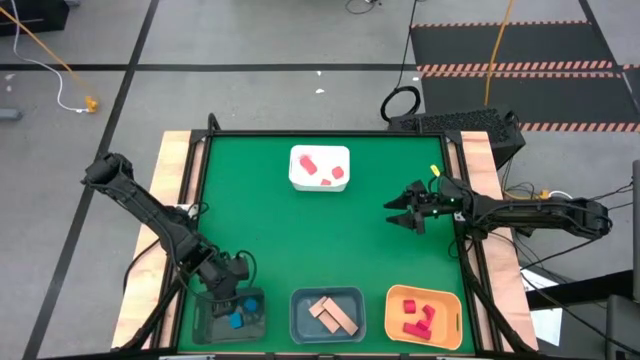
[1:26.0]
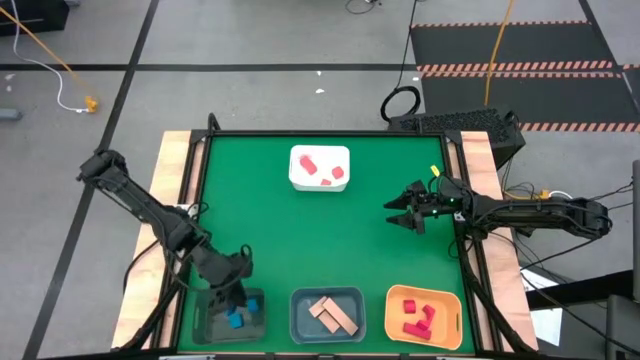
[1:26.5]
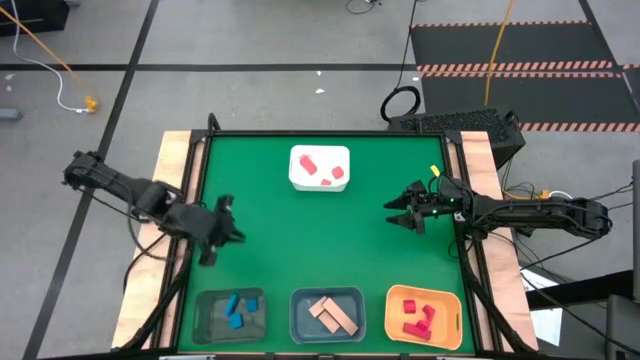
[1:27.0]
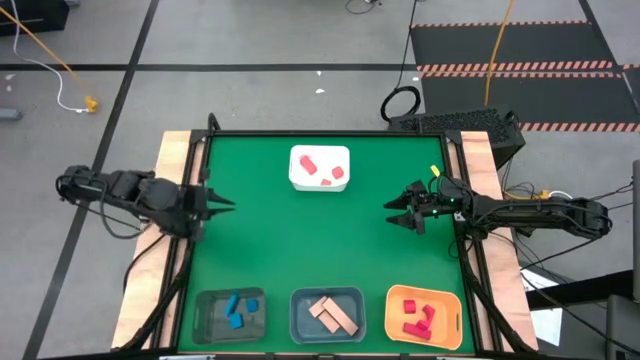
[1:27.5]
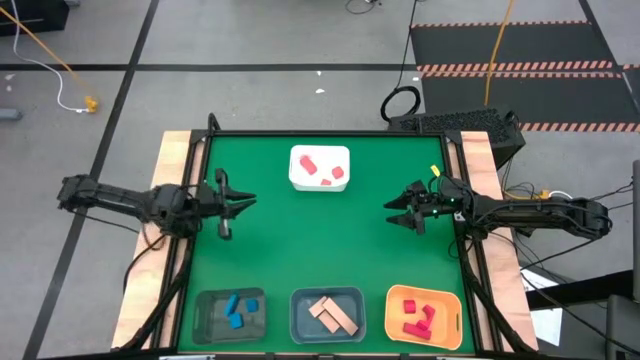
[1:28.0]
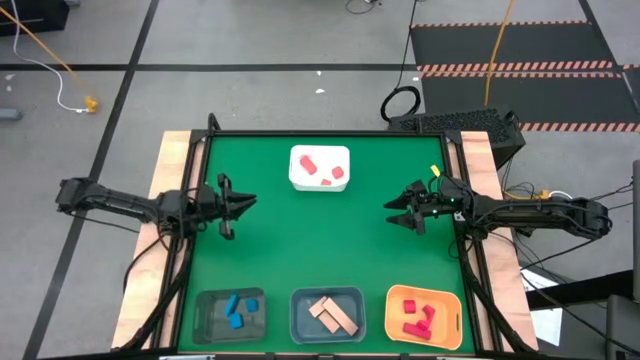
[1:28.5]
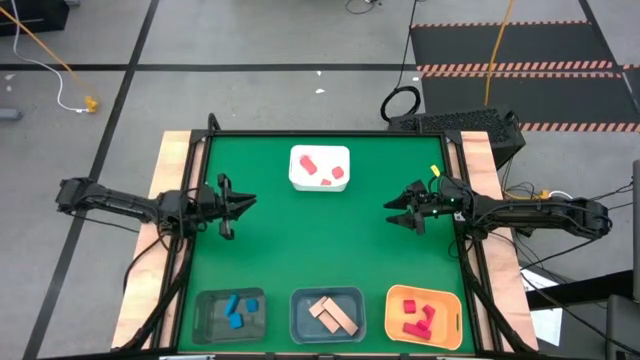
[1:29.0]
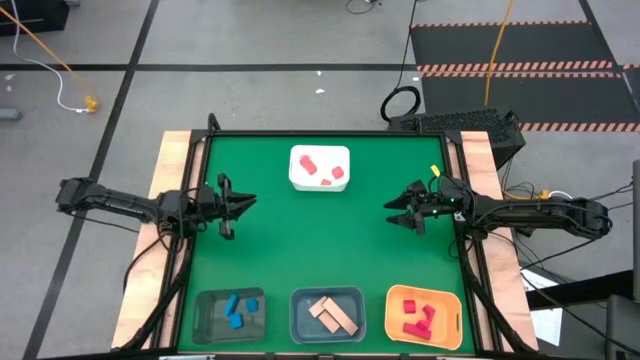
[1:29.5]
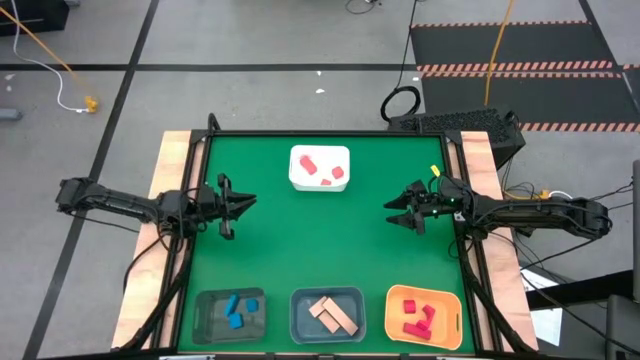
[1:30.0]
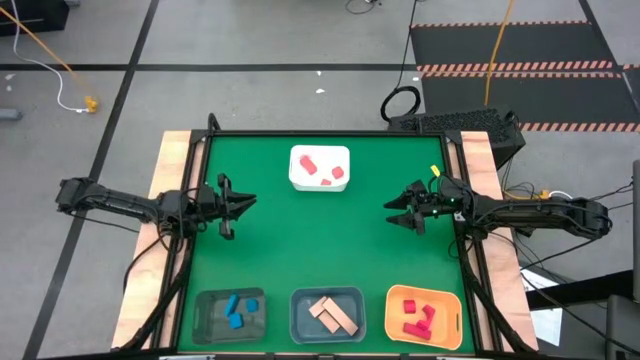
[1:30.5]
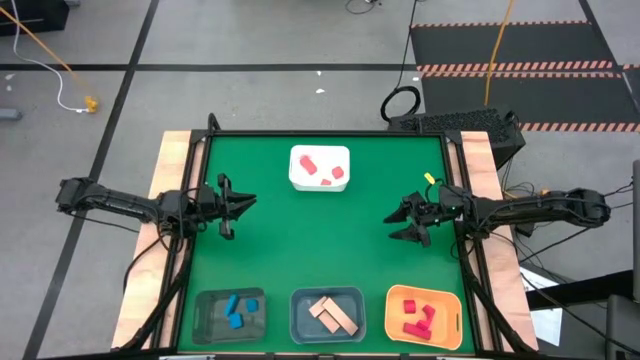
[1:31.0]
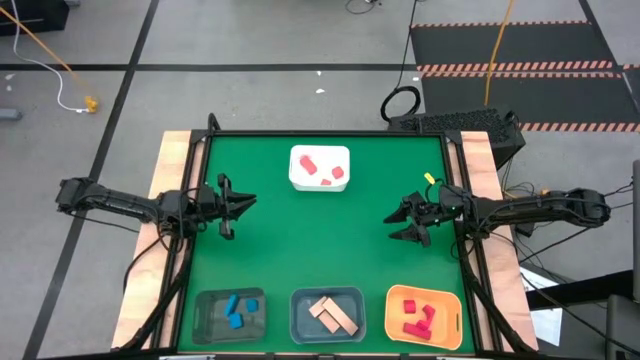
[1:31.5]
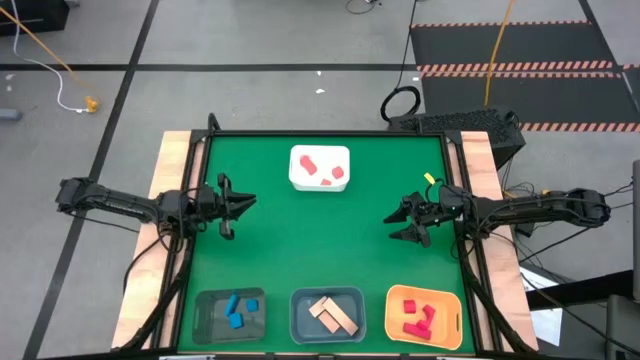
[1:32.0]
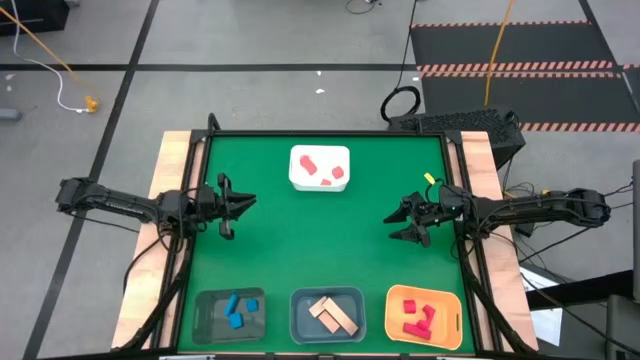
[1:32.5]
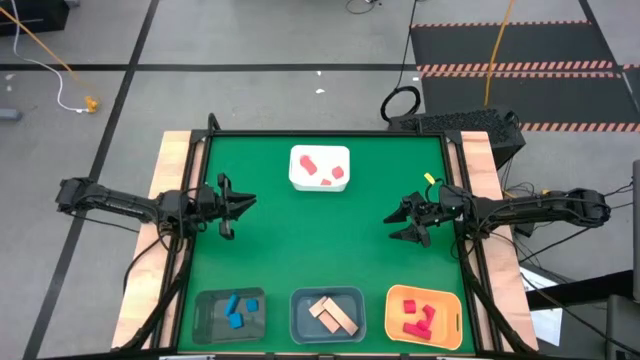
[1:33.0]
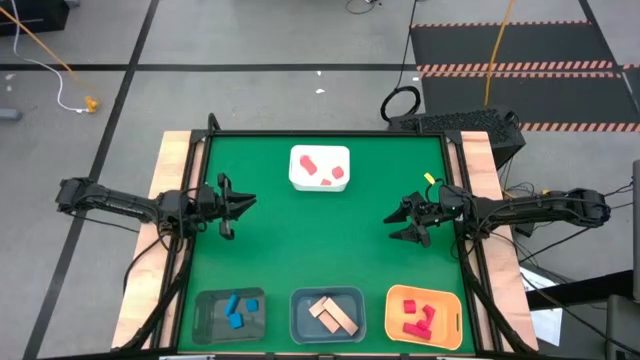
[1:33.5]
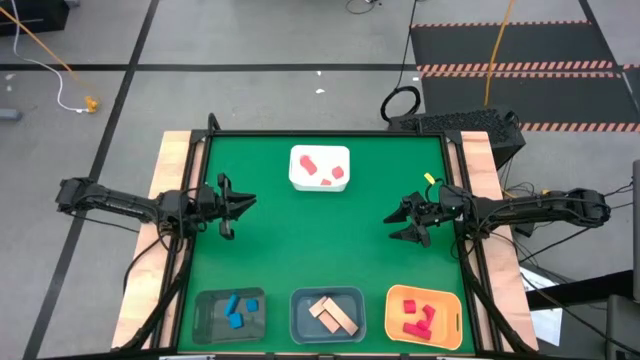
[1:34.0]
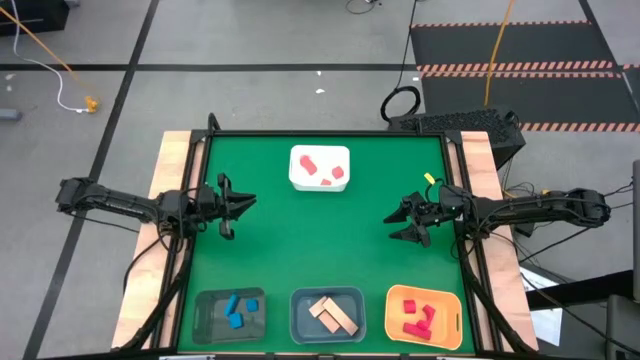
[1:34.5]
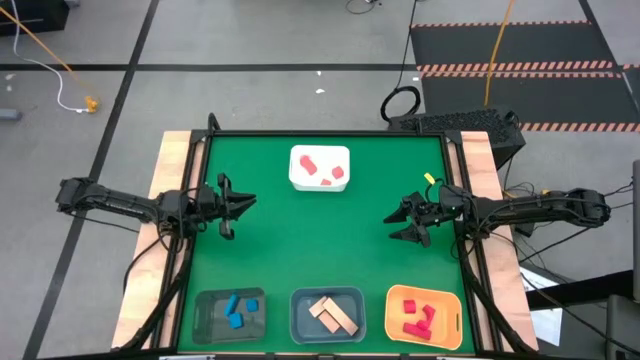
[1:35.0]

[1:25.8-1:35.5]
Task: Sort & place blocks by color
Return to Home Position

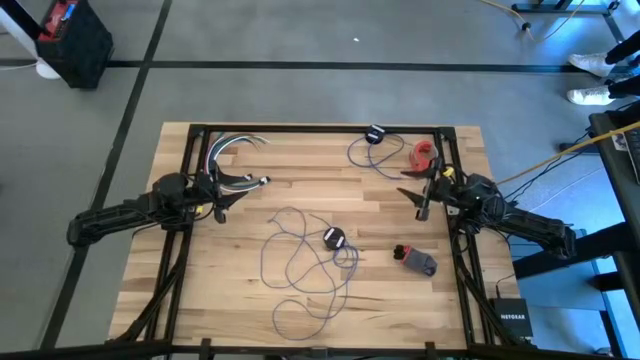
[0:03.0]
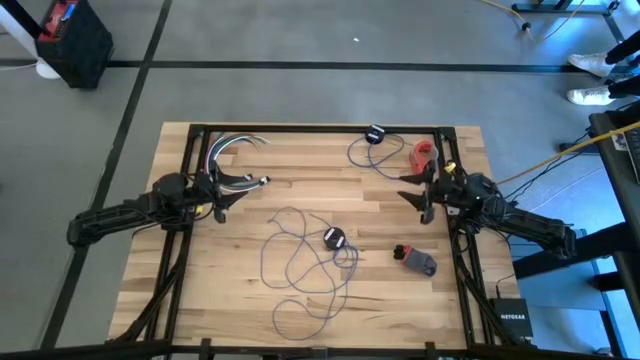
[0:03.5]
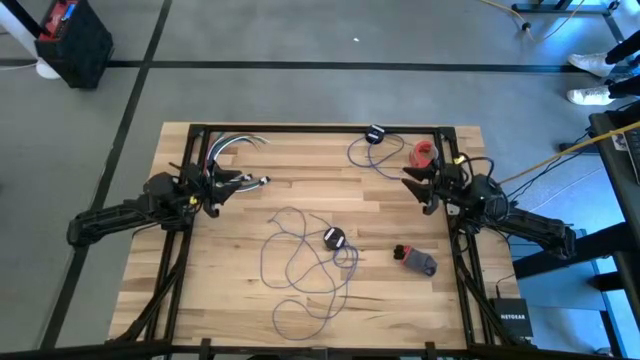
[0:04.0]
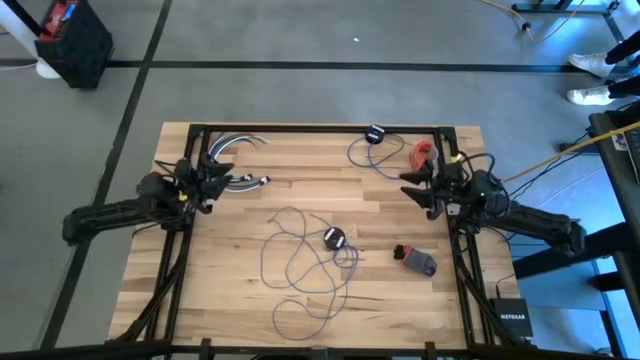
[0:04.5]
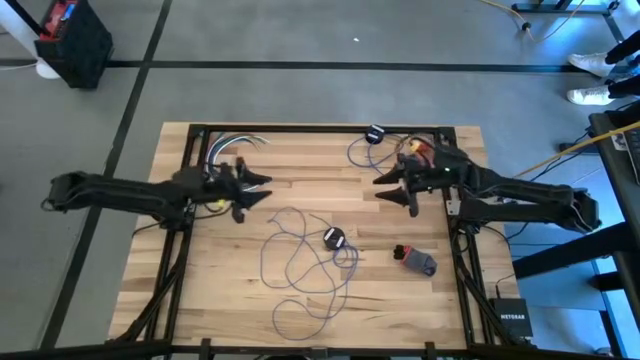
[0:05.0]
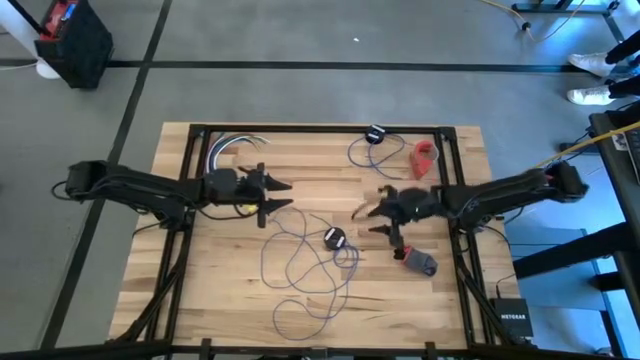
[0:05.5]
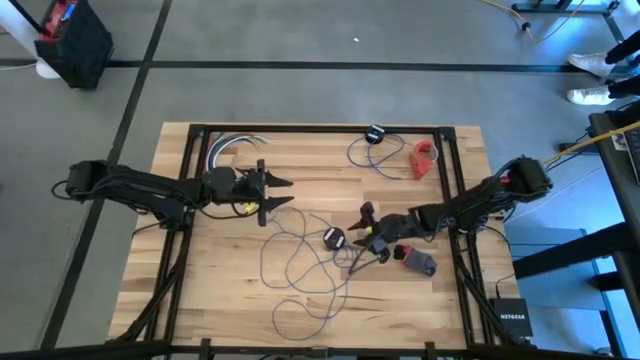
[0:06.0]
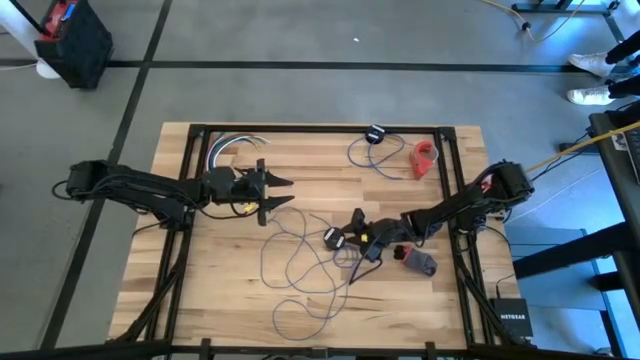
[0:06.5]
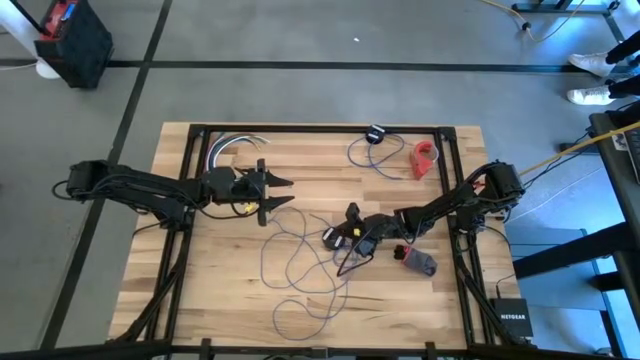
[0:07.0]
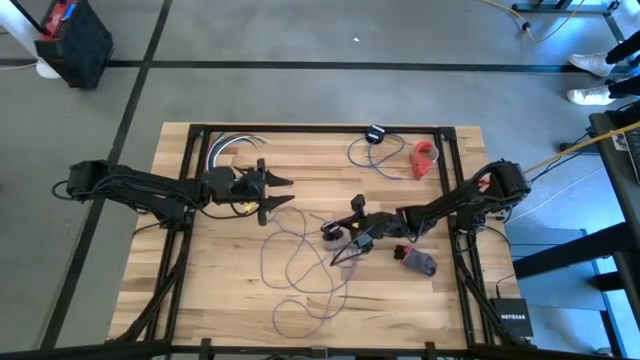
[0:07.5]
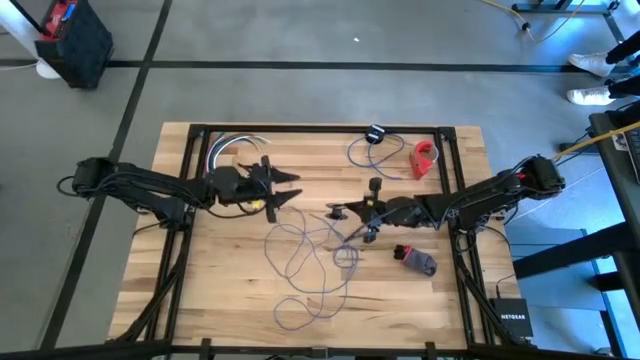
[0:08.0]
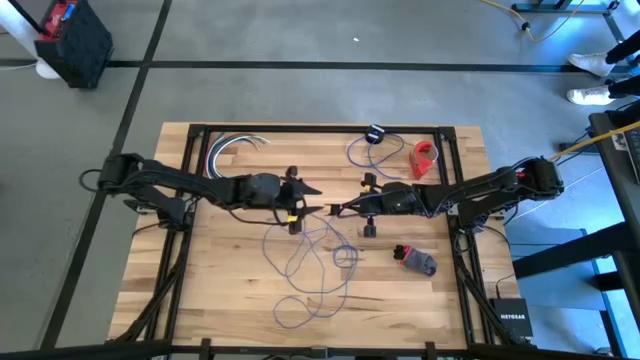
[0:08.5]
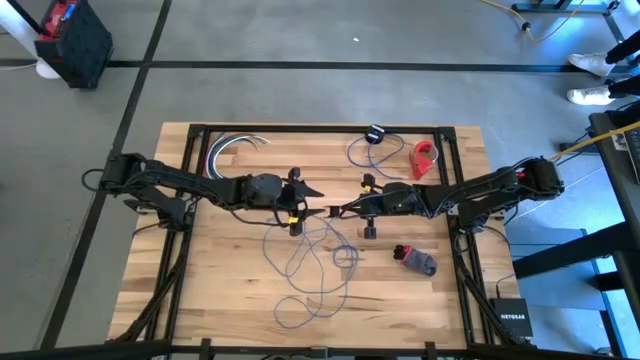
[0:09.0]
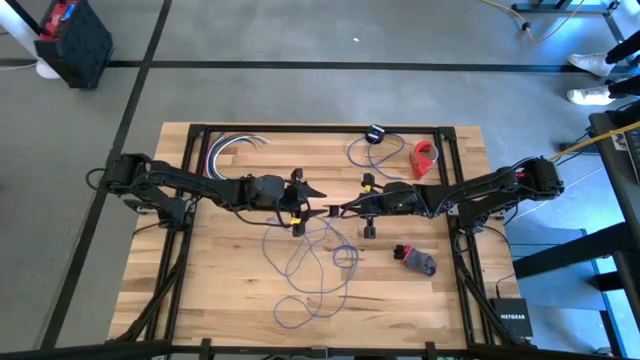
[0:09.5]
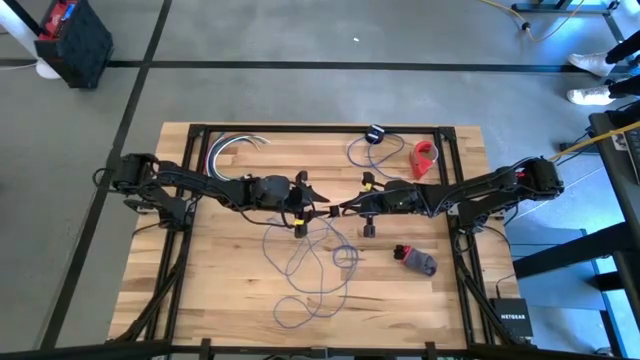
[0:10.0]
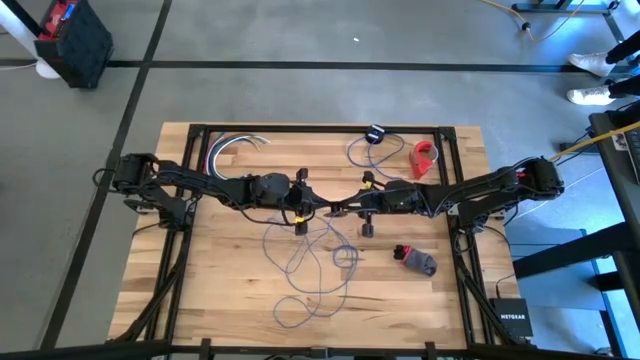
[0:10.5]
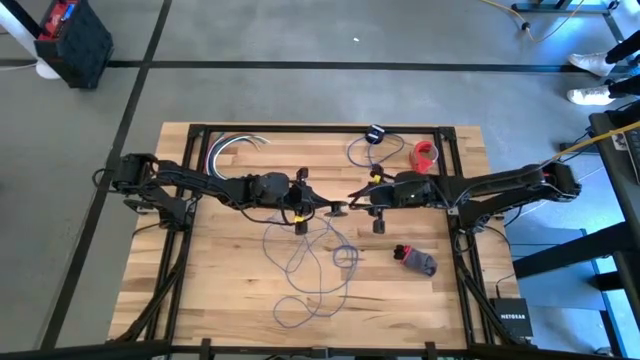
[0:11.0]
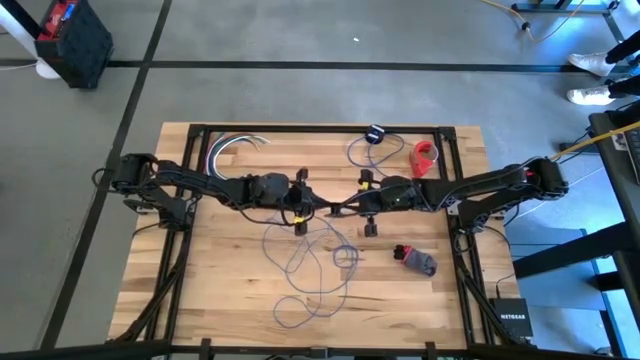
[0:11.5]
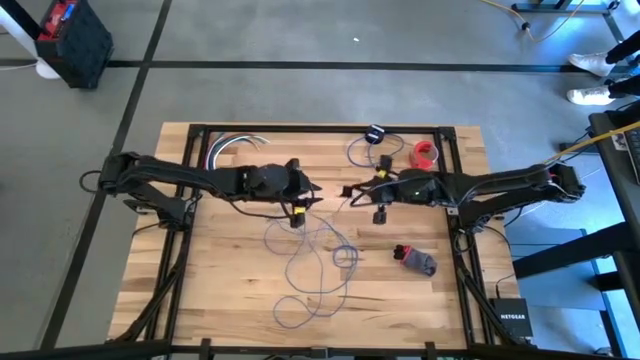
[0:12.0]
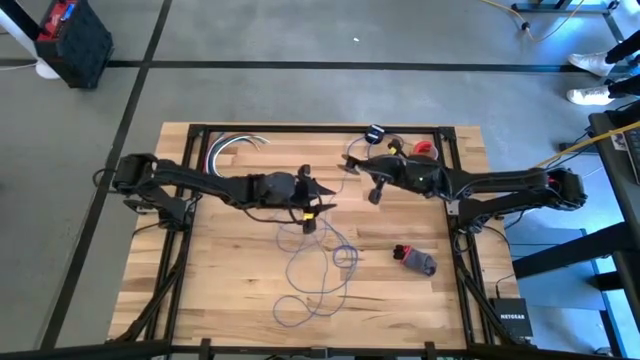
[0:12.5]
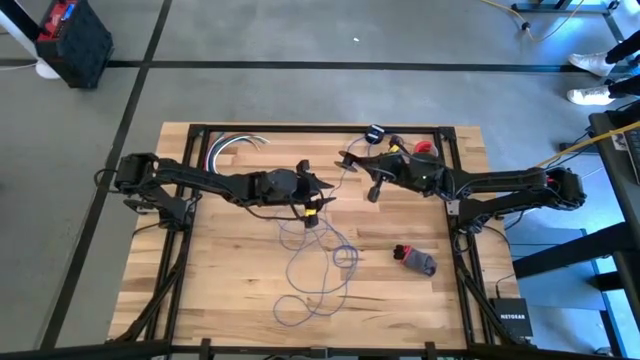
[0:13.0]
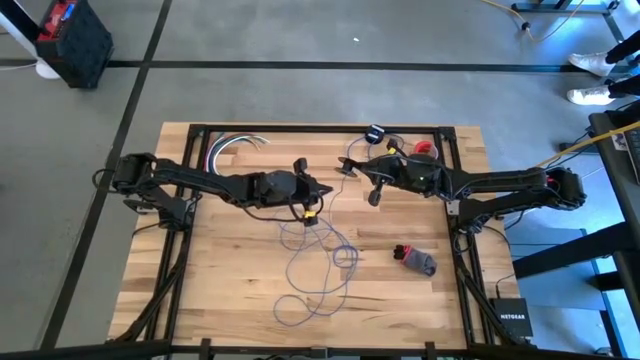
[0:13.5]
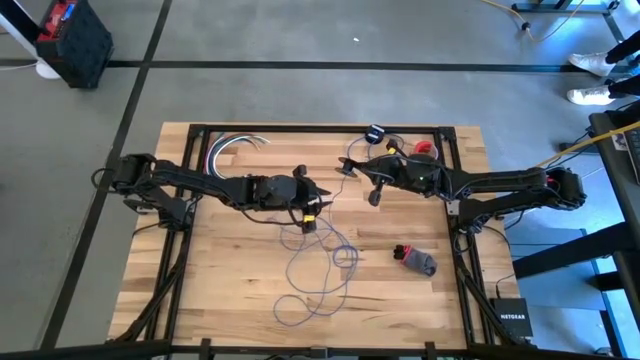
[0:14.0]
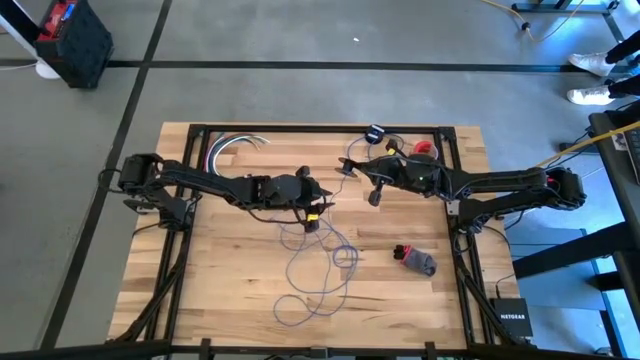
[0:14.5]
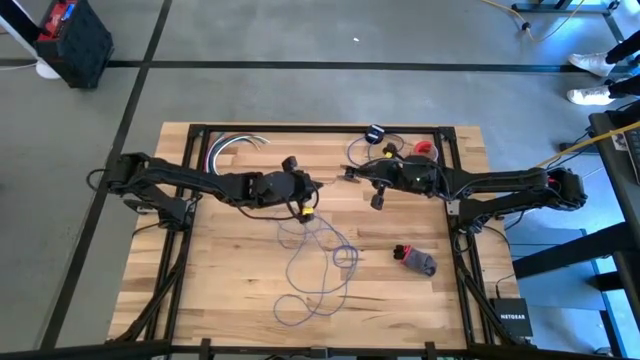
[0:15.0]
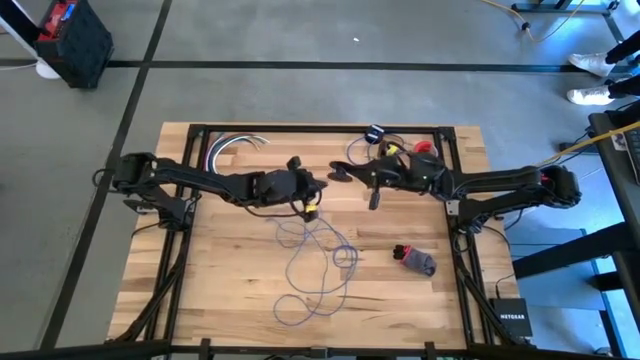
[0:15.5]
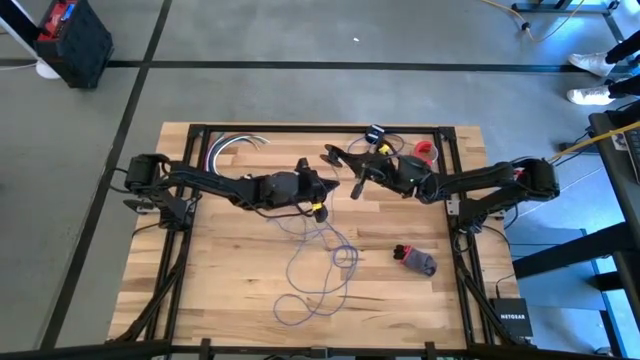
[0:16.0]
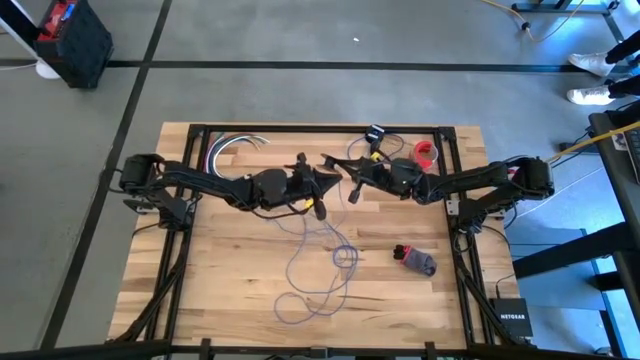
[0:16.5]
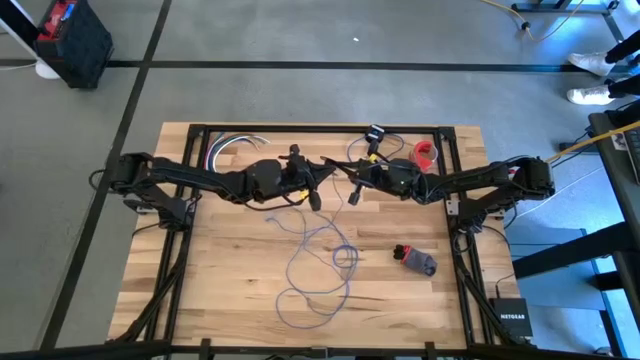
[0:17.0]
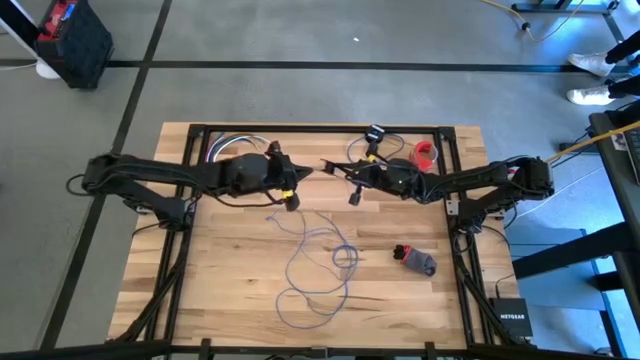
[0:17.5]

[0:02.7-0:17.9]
Task: Coil cords
Coil the blue wire onto the spool
